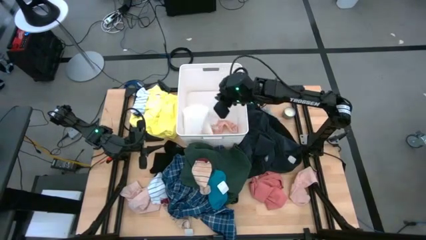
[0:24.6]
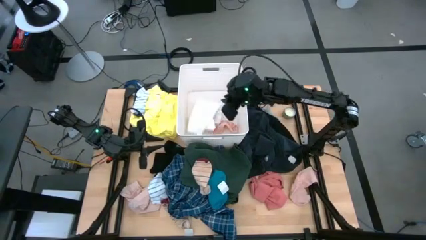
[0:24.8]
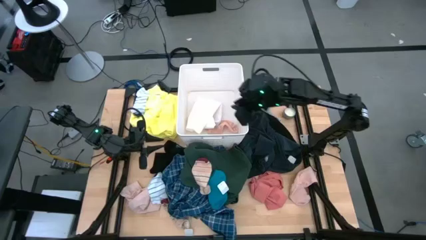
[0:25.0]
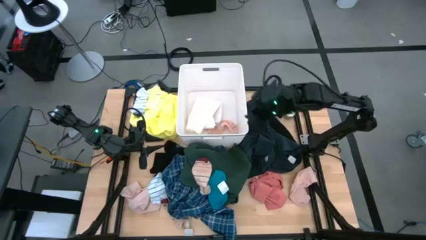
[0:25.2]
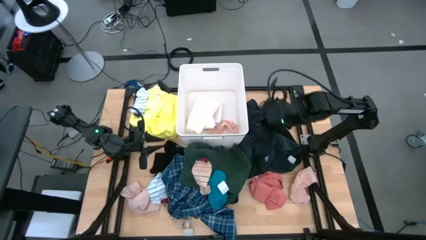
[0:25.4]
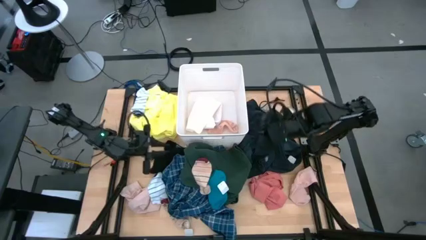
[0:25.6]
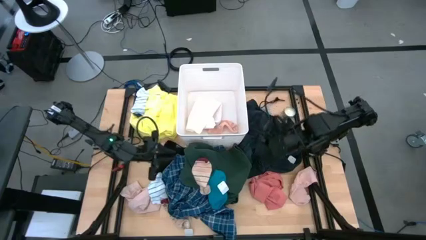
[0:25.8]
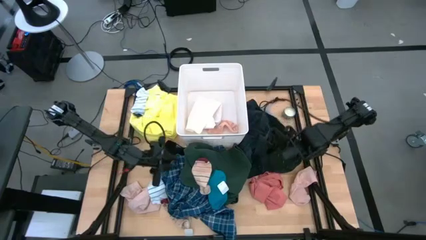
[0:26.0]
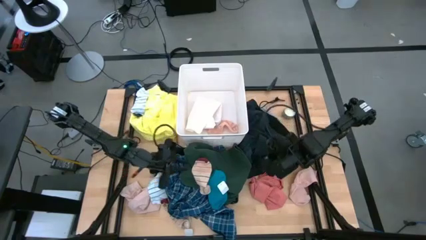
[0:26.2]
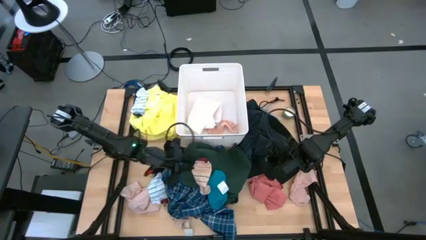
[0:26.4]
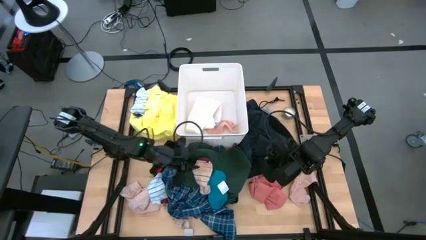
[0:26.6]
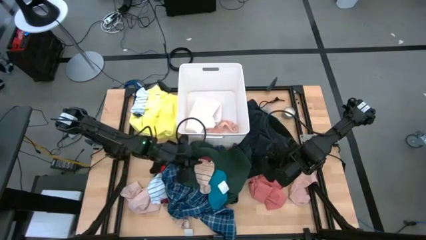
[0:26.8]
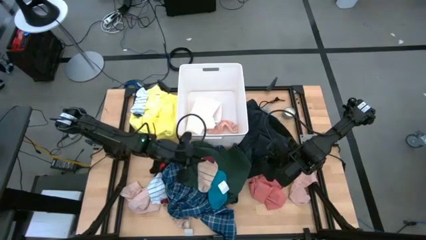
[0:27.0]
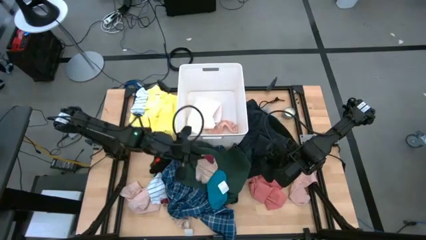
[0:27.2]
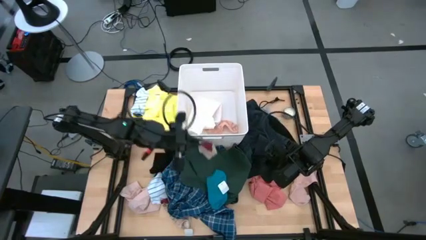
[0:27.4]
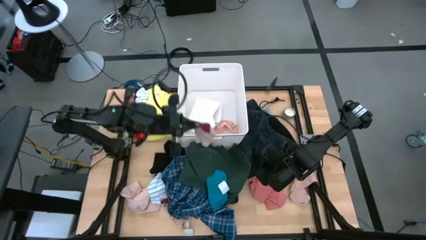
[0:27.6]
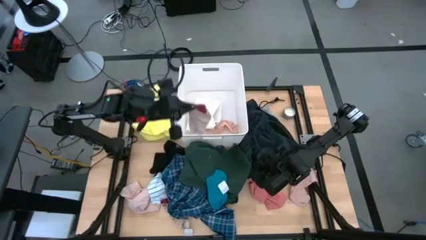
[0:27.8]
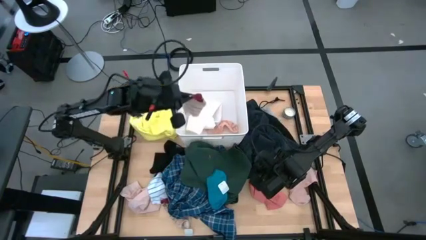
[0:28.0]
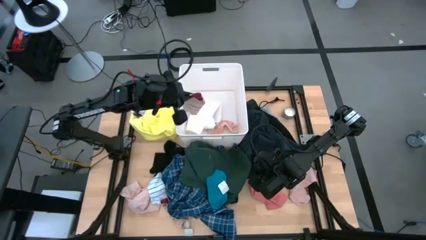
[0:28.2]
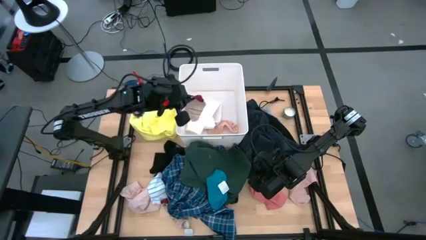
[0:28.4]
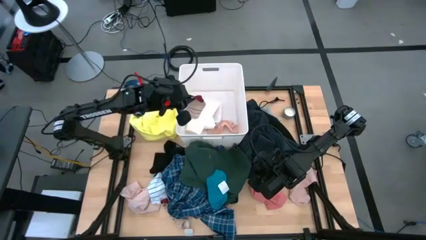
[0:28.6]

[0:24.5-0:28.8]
Task: Sort clothes
Put the light orange striped sock into the laundry bin

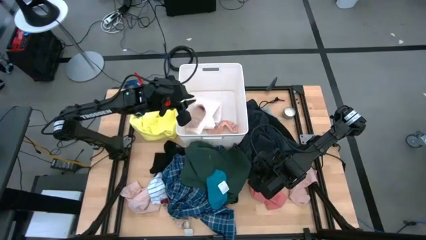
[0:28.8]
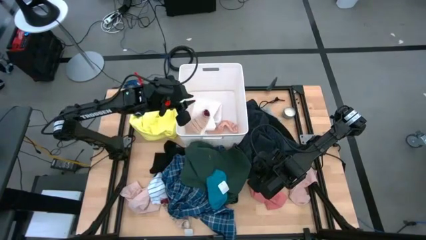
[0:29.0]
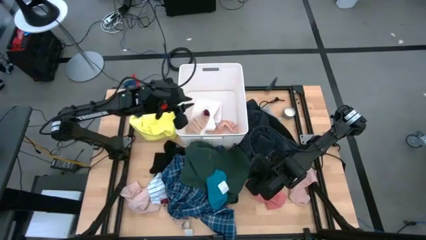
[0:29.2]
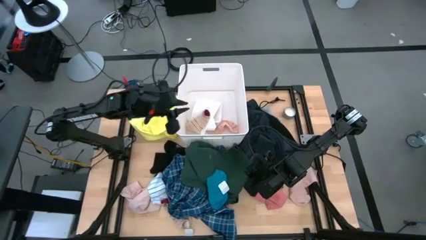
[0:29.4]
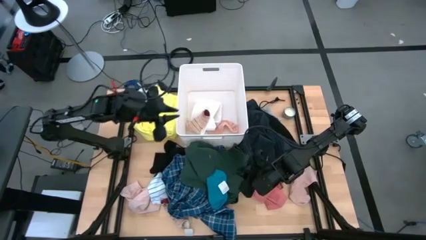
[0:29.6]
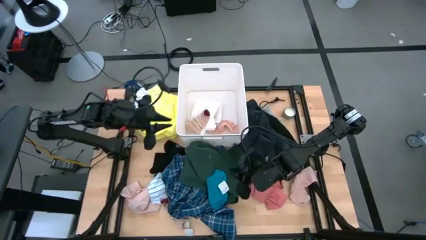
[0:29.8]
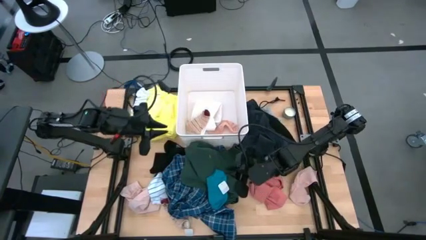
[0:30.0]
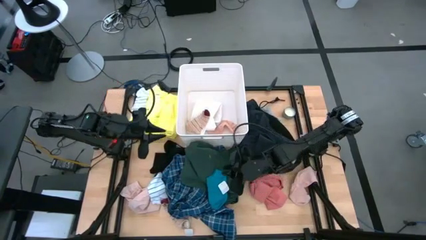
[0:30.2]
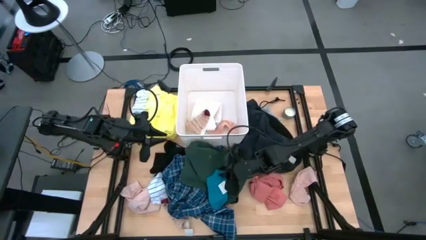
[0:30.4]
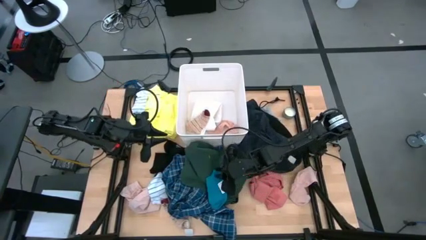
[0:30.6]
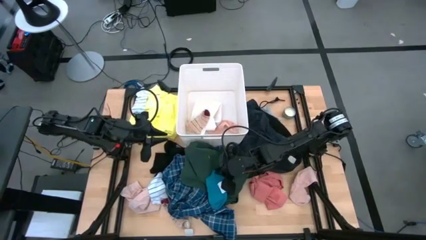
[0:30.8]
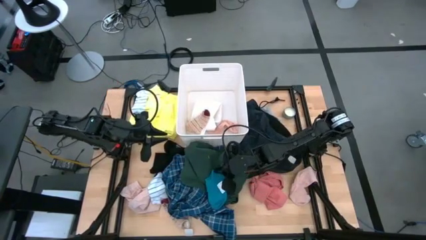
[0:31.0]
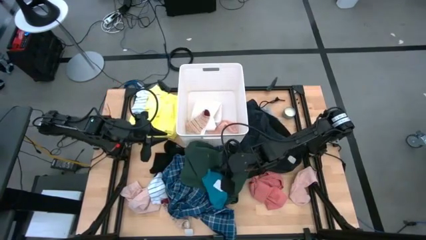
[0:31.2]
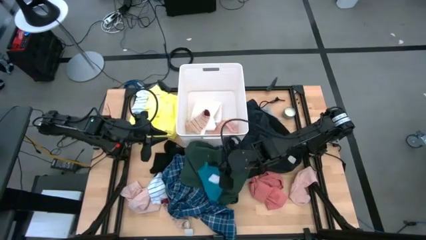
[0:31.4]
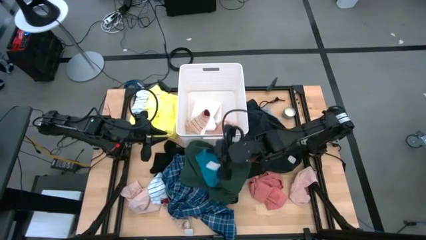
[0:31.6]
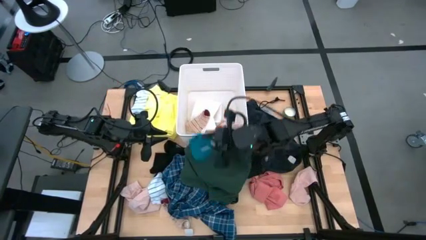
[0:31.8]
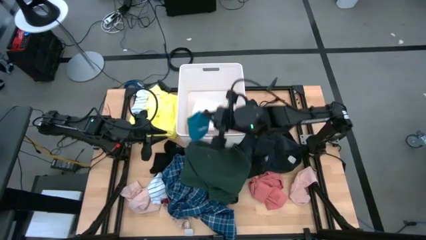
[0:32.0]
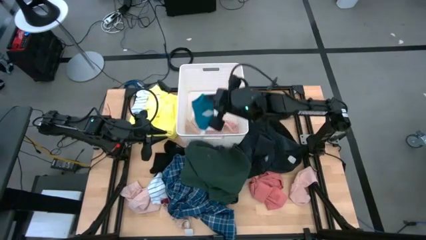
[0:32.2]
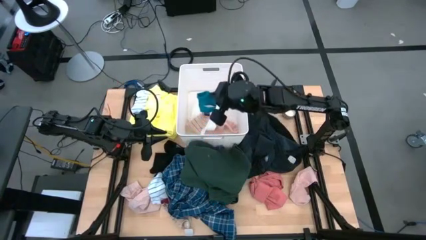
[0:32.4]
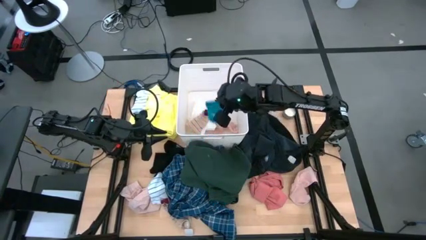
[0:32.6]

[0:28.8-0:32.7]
Put the sky blue sock into the laundry bin

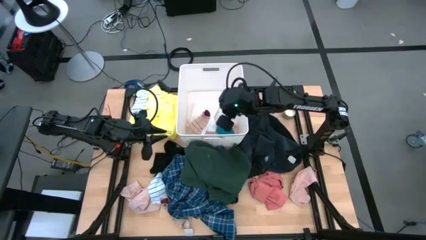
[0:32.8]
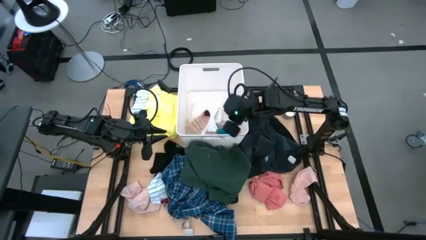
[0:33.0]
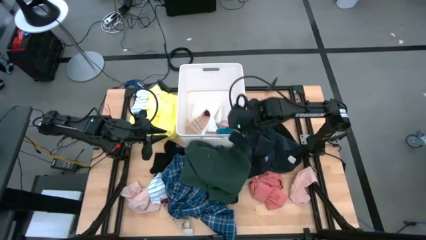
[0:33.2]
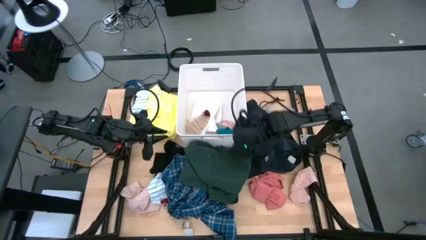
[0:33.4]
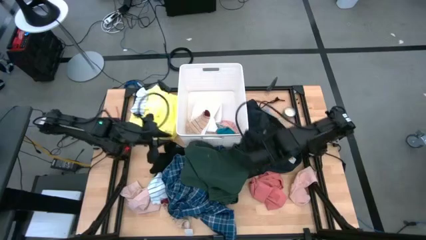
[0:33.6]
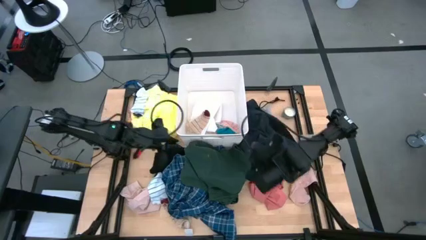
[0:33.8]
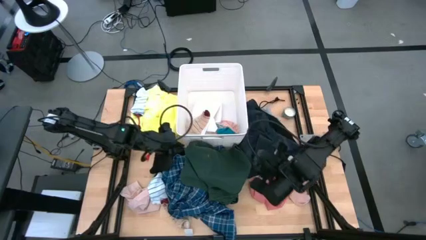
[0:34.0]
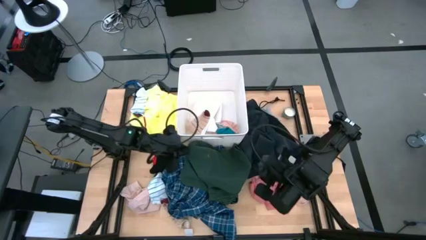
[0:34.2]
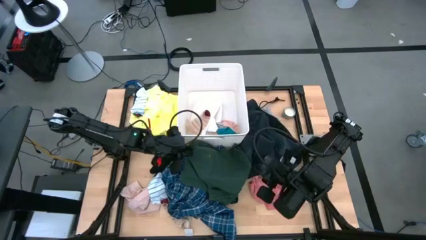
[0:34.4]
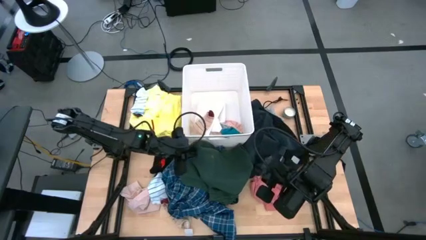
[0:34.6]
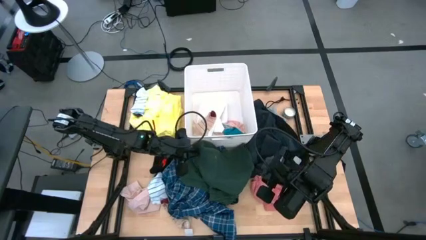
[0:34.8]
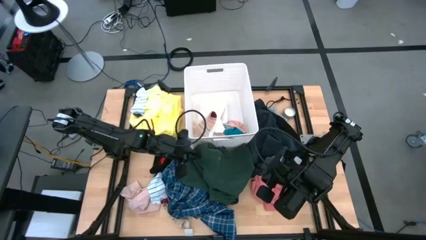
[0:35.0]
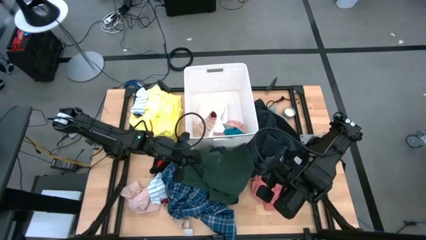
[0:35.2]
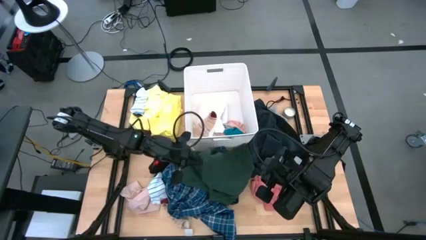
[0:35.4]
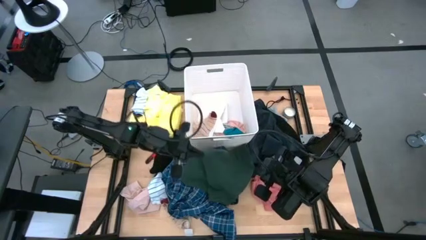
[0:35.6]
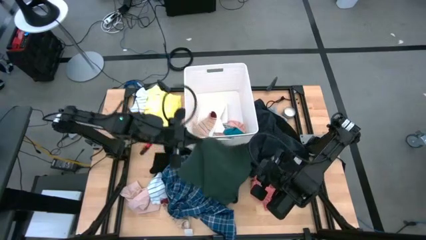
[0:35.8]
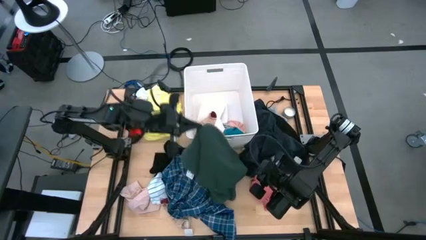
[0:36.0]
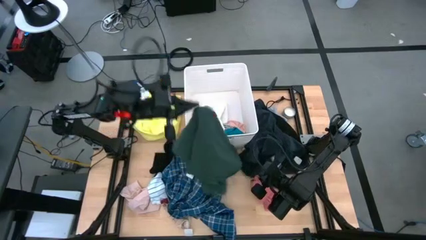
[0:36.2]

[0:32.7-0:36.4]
Put the green blouse into the laundry bin

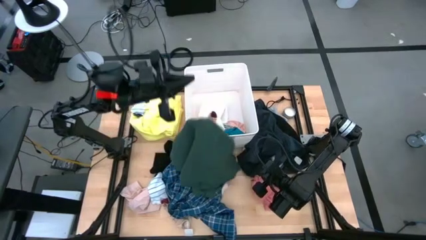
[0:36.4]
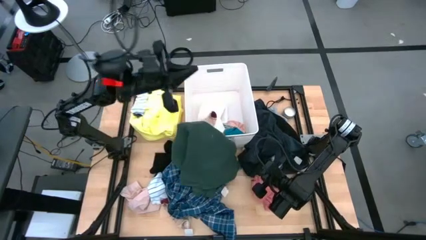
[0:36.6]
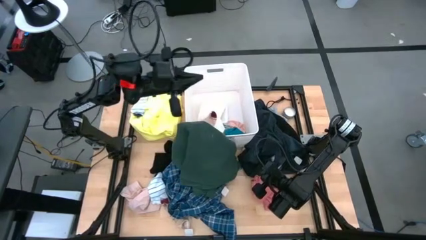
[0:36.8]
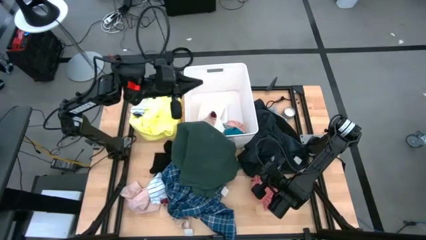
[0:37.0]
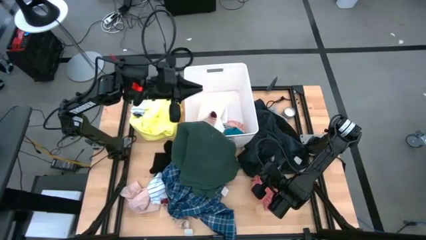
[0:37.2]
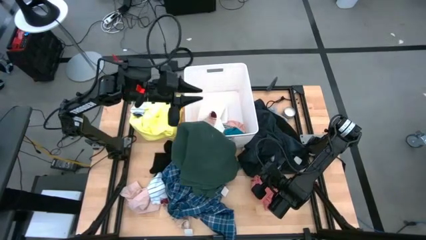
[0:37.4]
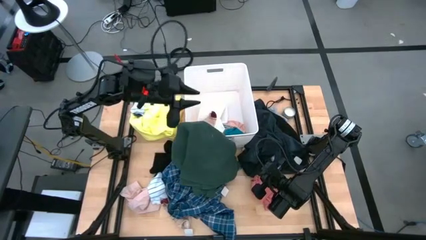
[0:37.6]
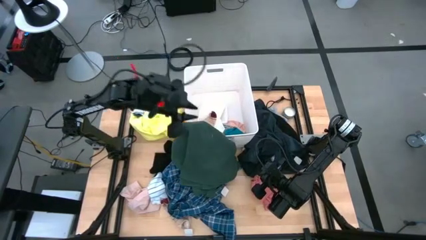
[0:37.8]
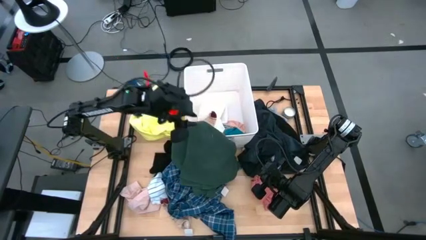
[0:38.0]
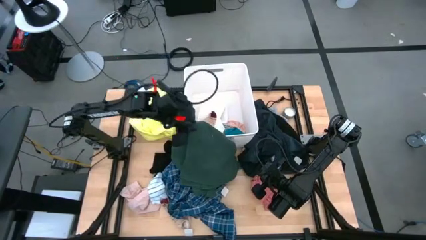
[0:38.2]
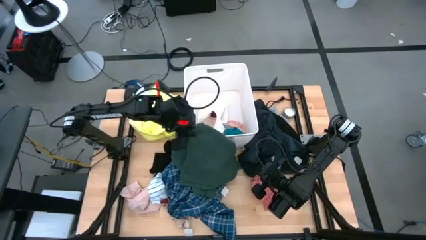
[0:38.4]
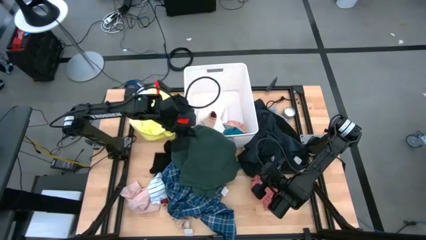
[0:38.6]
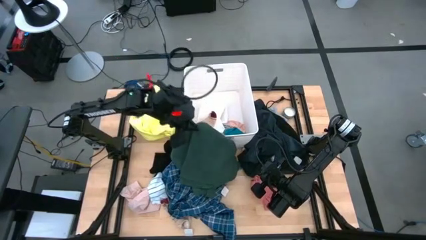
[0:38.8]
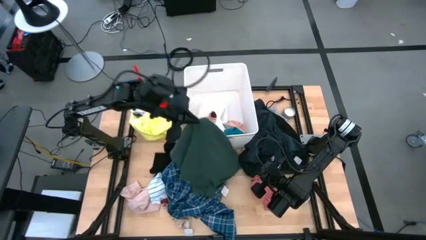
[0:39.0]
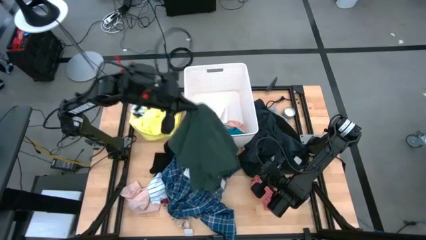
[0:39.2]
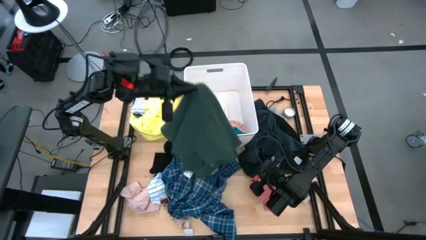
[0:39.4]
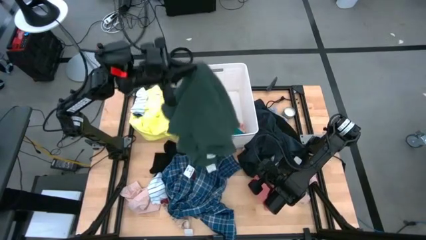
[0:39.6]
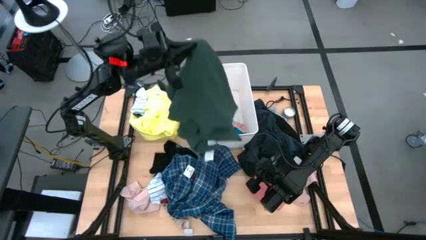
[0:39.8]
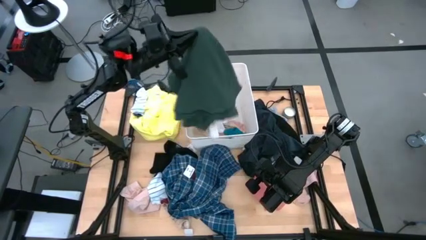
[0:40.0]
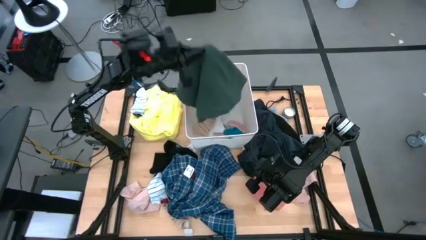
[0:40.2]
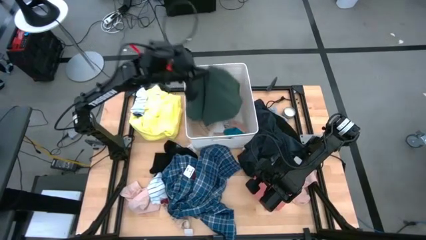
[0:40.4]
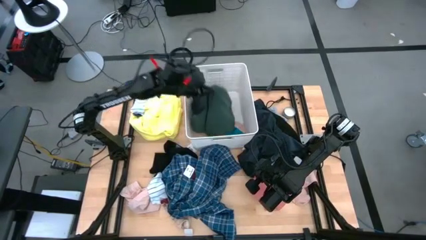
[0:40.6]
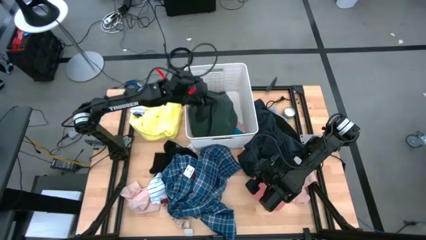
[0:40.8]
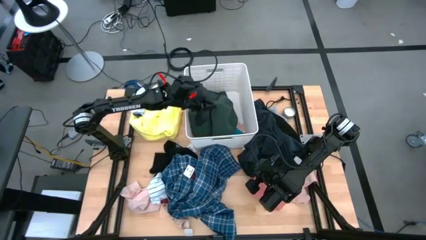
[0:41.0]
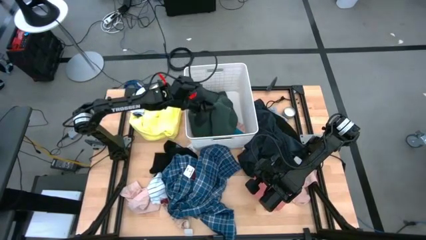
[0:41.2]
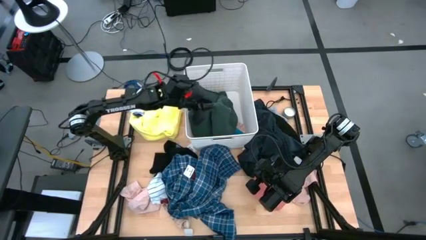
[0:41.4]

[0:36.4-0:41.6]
Put the green blouse into the laundry bin
